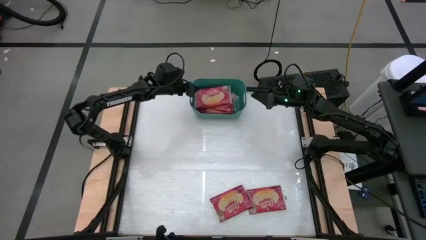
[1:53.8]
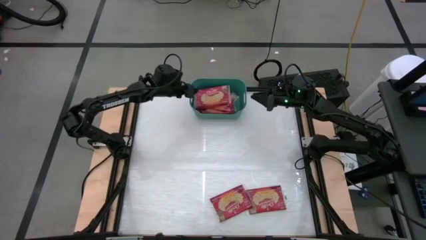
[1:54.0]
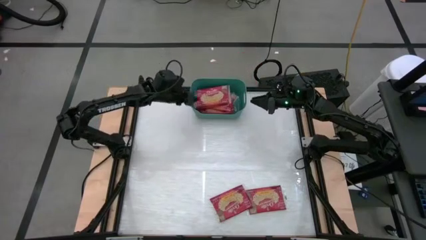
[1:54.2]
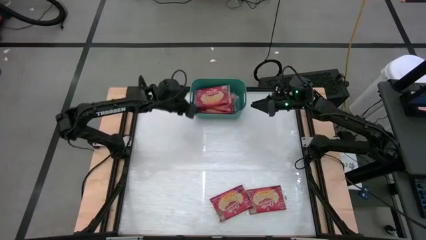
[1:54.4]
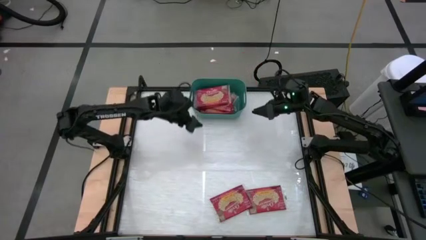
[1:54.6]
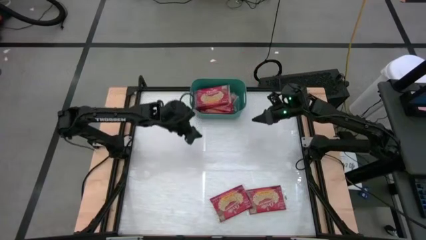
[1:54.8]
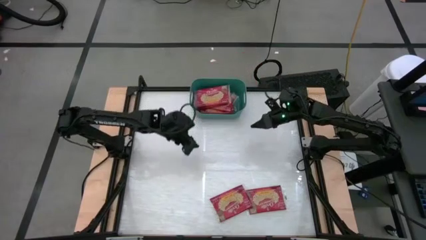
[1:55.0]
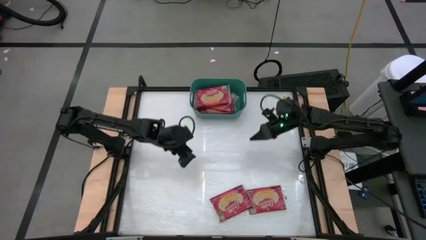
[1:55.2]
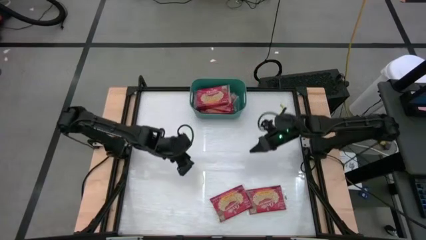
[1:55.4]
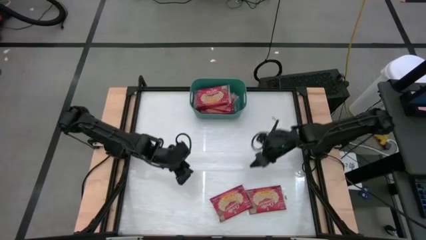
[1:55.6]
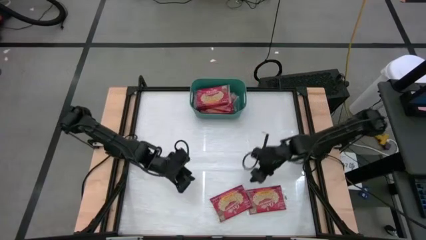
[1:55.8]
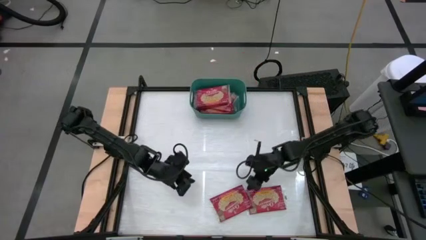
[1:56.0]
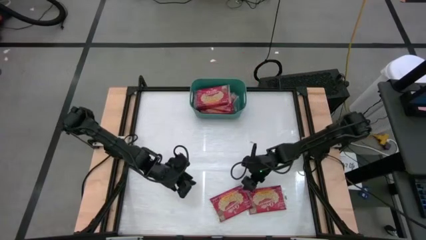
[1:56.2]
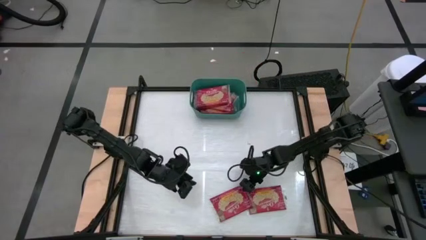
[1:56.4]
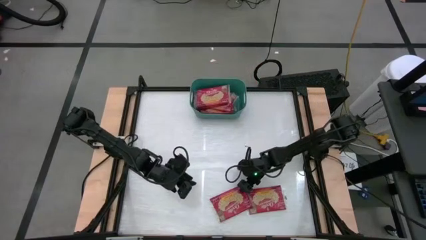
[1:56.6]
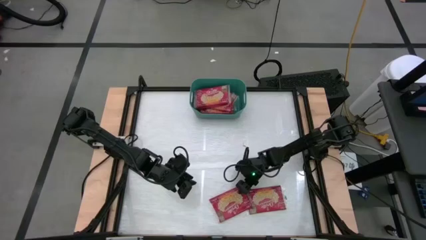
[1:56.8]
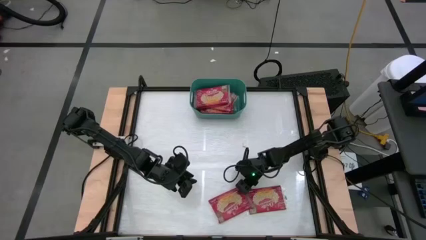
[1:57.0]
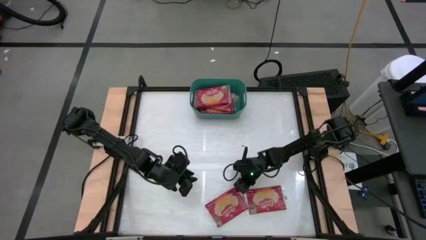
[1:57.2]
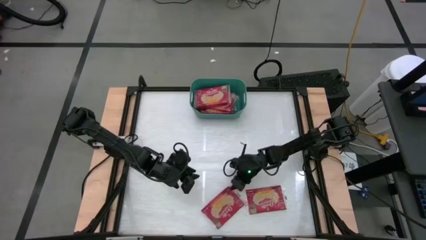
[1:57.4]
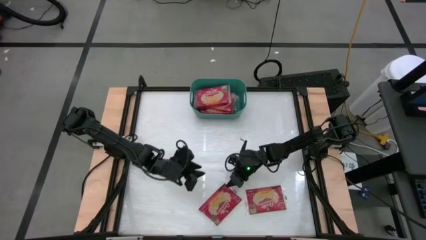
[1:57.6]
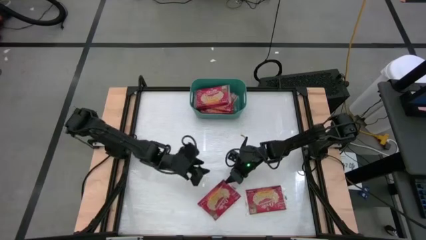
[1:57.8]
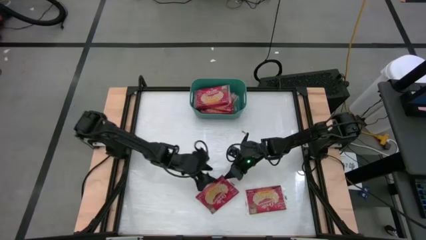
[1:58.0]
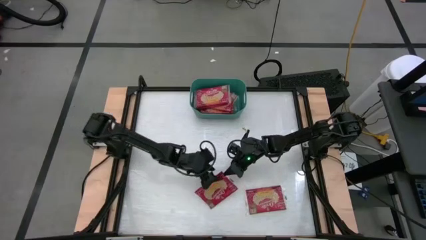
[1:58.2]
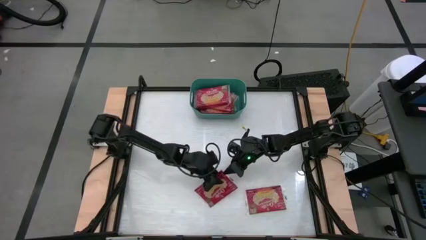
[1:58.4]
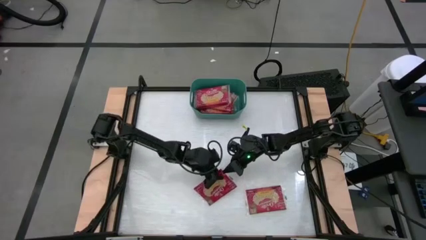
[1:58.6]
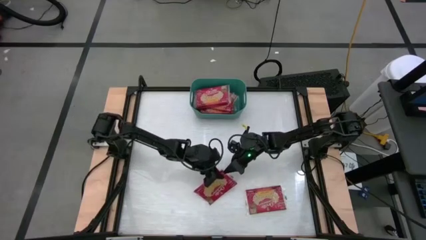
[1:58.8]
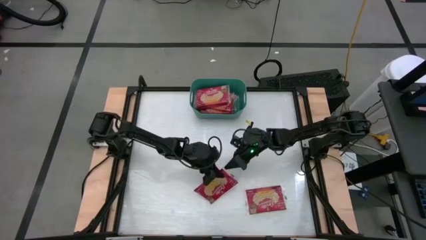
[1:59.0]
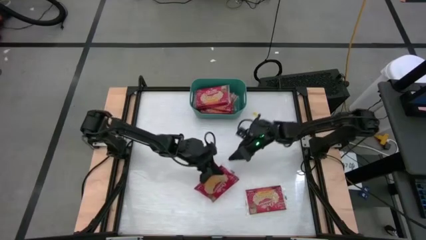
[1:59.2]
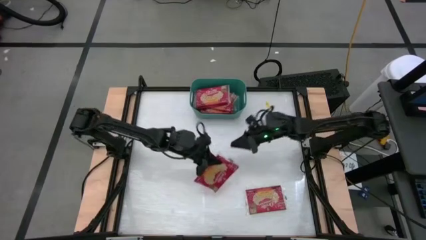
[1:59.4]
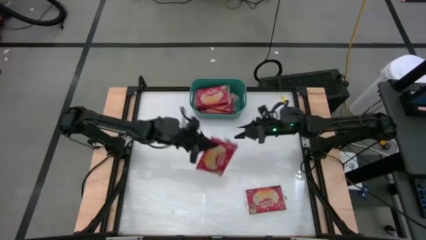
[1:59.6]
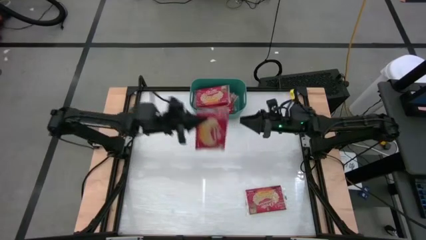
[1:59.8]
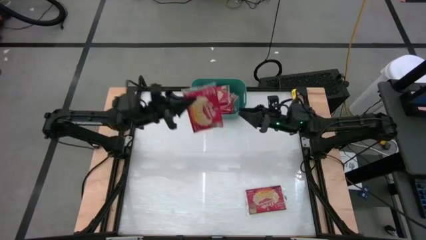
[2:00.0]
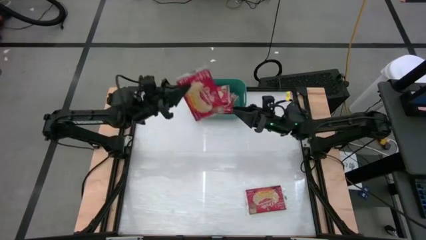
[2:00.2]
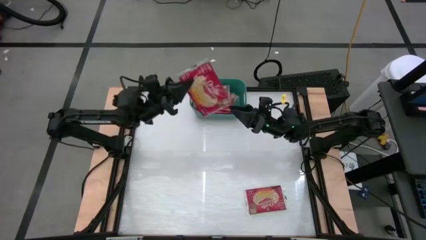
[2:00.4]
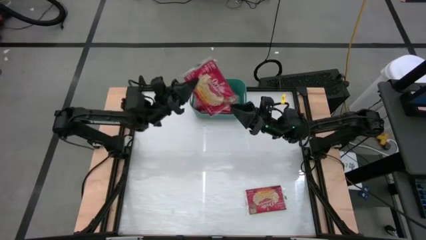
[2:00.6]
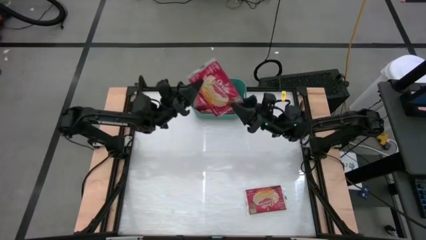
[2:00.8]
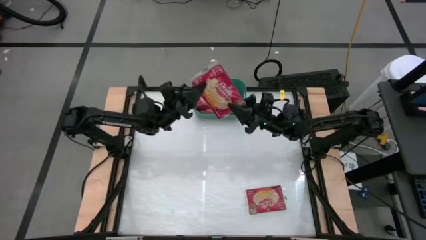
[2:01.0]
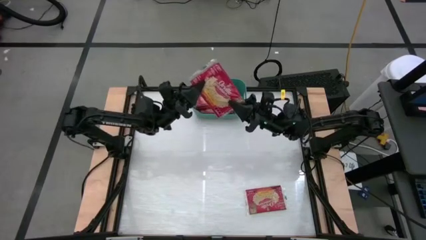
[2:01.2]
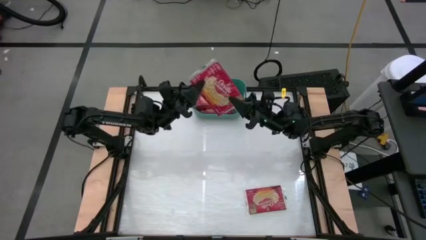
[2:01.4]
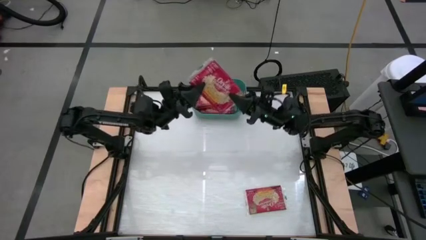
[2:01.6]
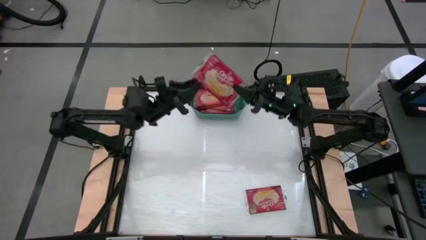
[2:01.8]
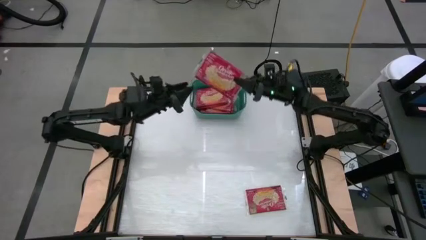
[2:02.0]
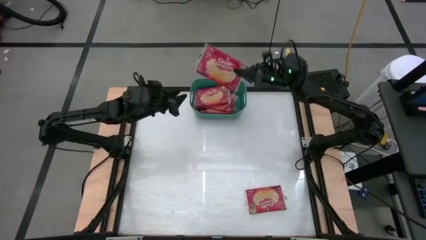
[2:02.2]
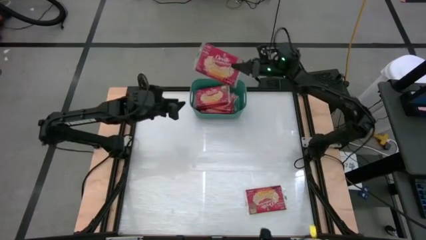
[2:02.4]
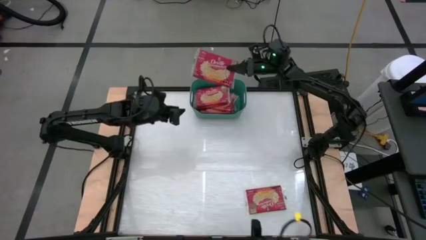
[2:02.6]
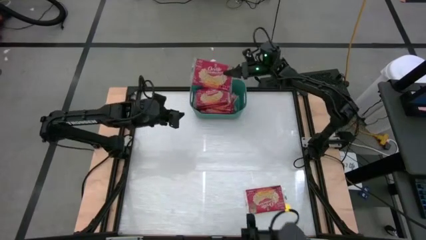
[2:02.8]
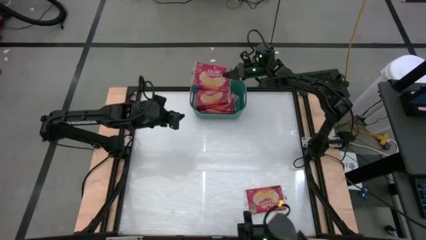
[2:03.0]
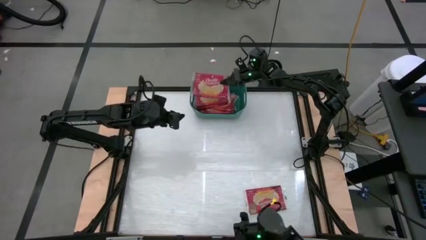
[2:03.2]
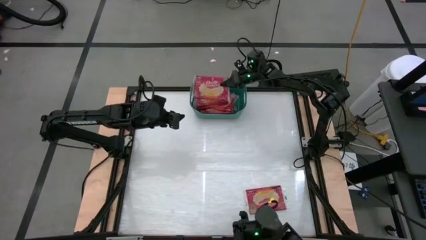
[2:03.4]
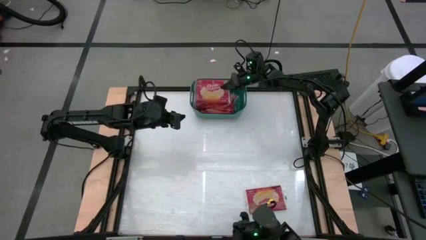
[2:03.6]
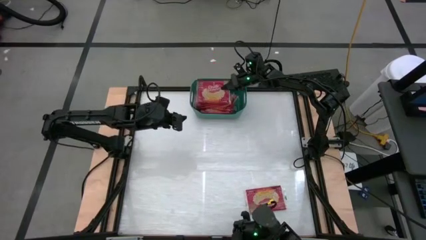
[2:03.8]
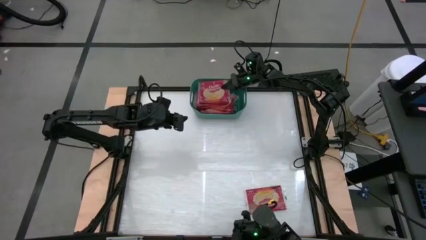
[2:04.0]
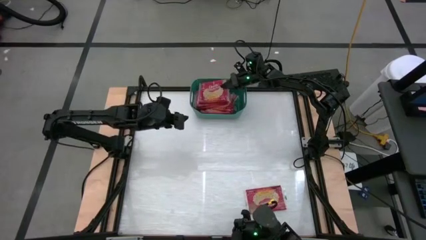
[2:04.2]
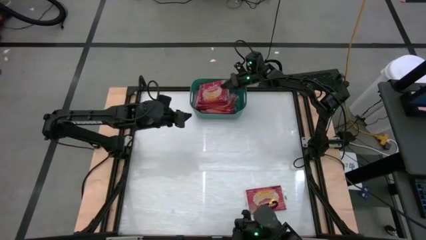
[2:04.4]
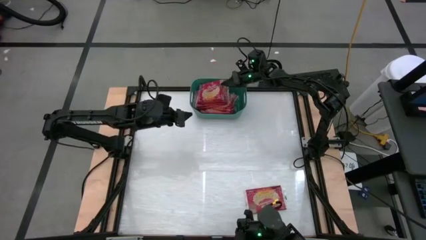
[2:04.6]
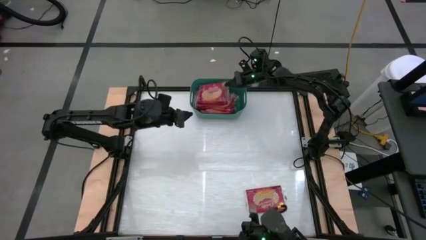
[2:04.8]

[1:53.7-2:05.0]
Task: Sort popcorn bags into baskets
Put the red popcorn pack into the green bin

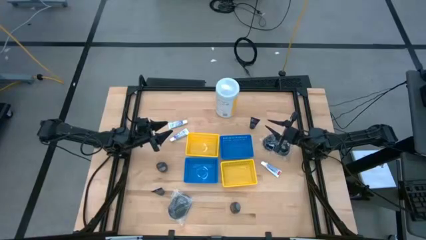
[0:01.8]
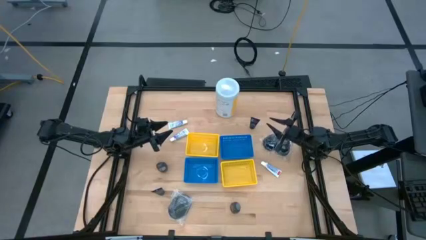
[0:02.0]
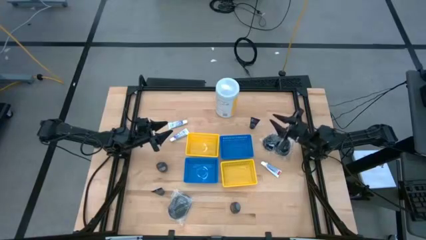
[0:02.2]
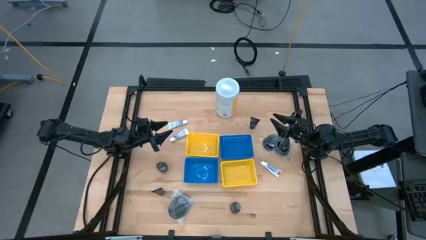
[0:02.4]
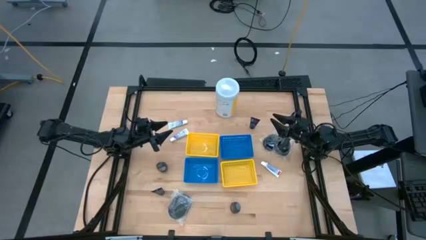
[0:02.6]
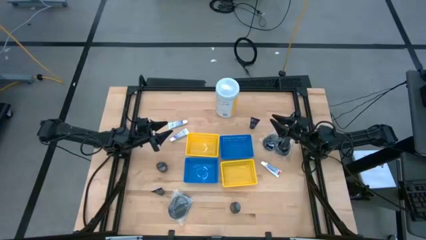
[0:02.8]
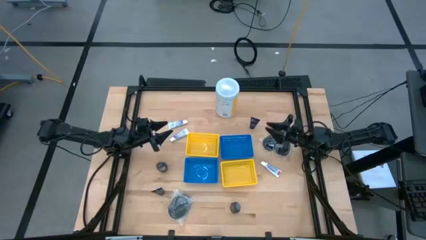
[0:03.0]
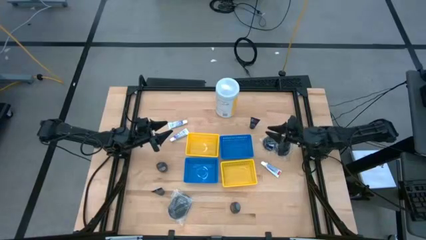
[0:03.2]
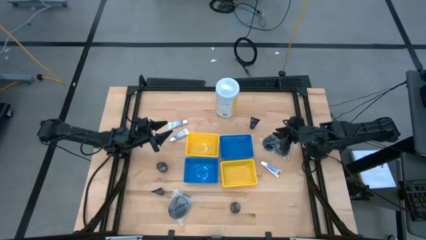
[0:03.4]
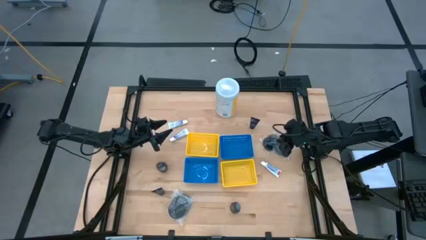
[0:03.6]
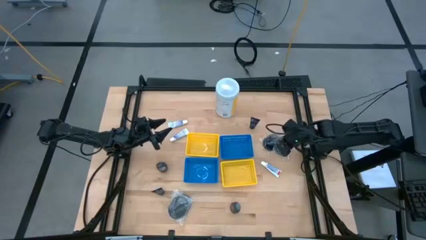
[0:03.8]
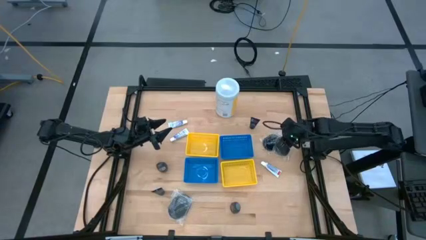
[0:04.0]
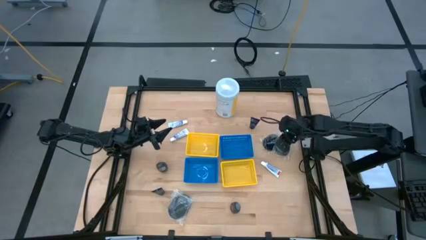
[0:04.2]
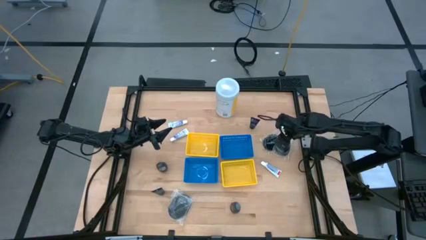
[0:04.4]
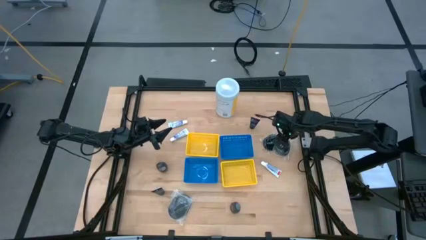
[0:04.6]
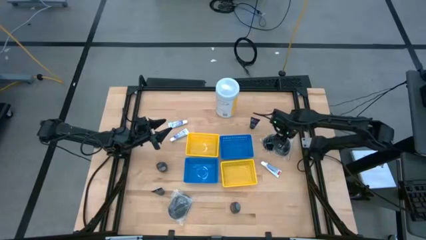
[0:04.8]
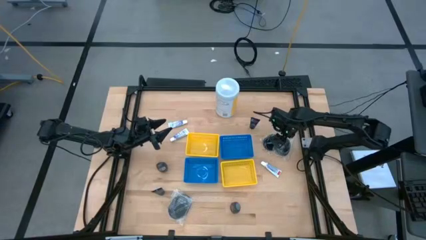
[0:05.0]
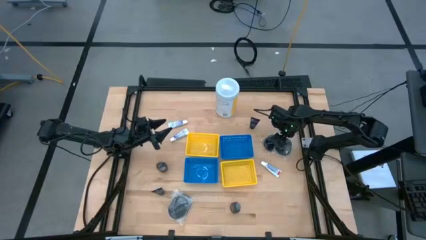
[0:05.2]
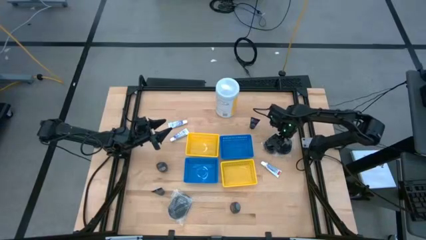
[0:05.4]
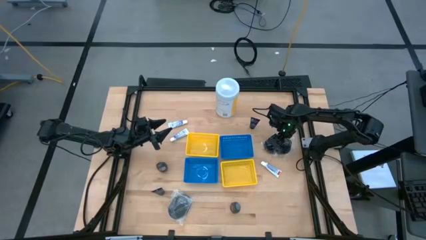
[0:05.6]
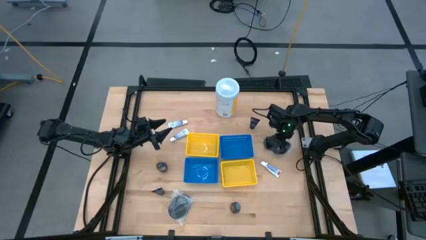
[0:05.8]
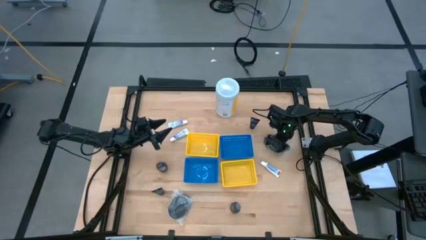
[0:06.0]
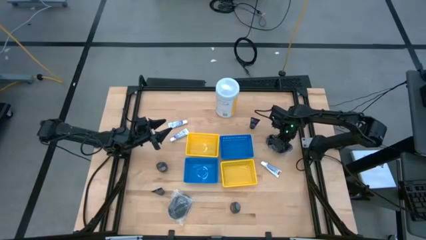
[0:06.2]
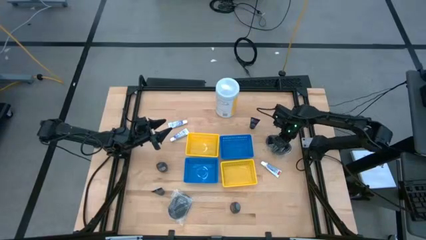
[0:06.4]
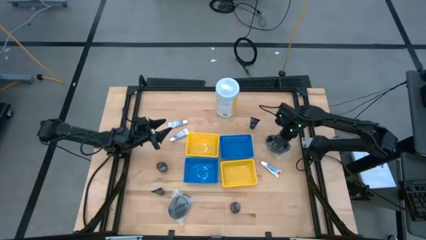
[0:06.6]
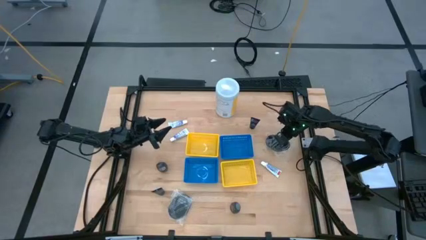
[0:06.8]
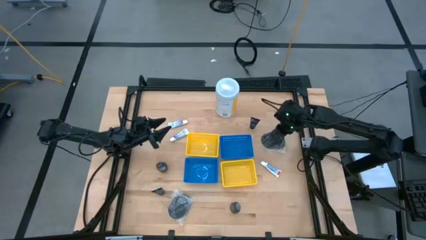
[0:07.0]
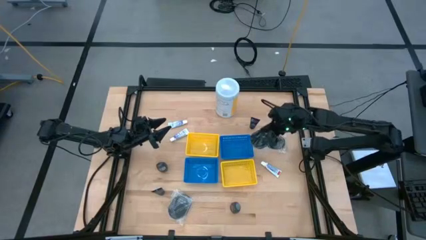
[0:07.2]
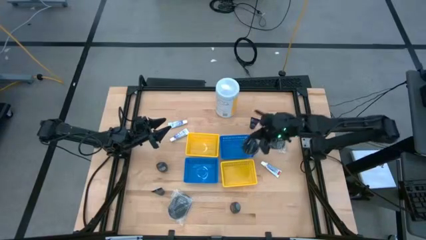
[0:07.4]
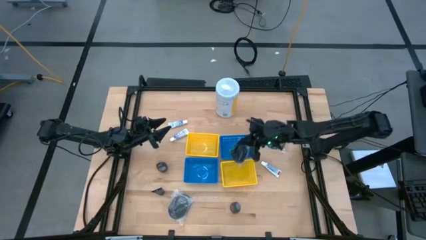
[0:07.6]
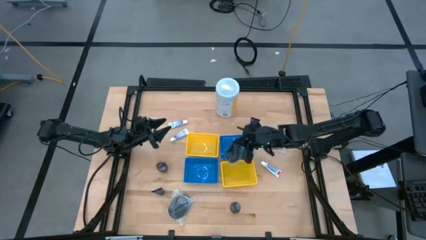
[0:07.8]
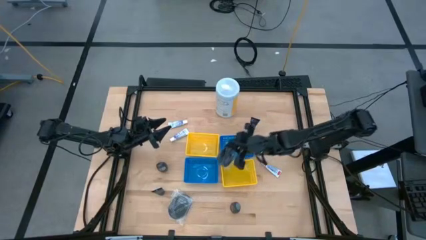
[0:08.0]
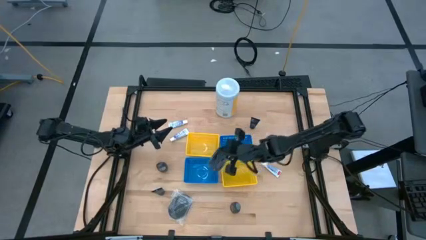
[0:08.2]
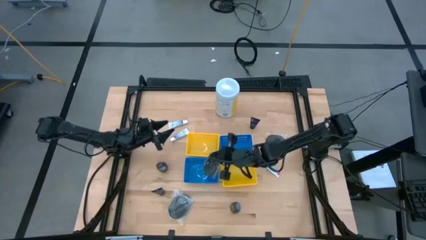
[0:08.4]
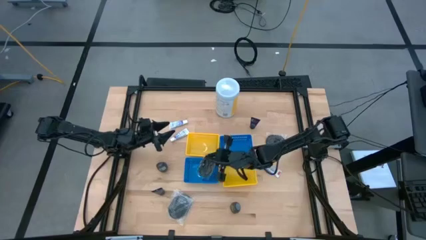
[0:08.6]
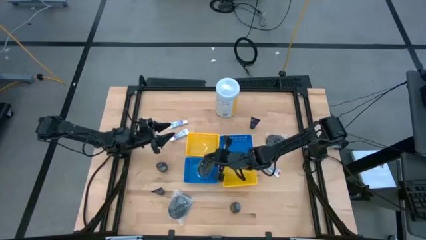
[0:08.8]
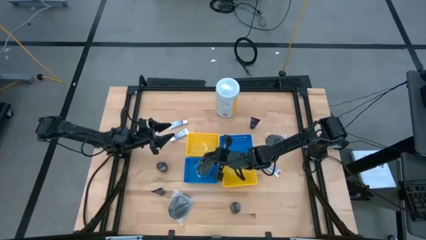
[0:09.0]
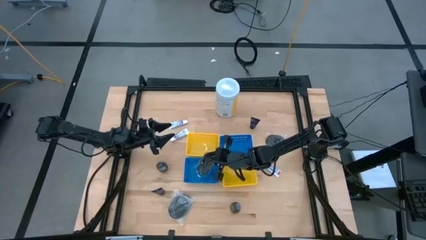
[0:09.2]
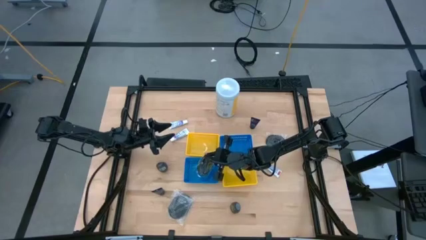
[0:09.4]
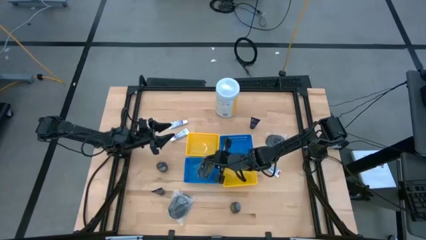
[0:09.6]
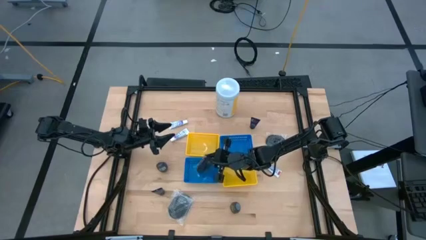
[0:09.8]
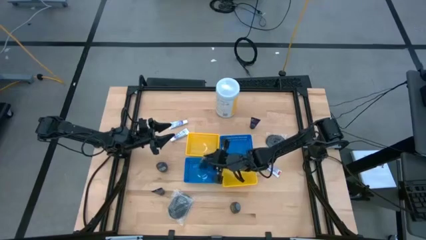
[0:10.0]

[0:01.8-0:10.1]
Task: Pick & Place Travel size toiletries
Put the black hairbrush into the bottom blue bin
